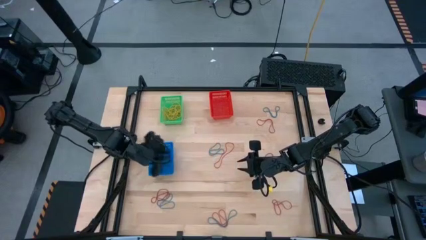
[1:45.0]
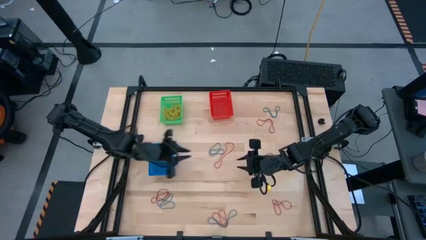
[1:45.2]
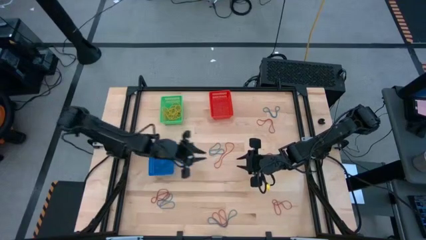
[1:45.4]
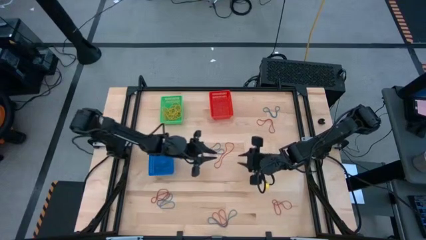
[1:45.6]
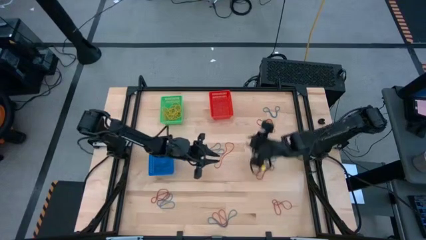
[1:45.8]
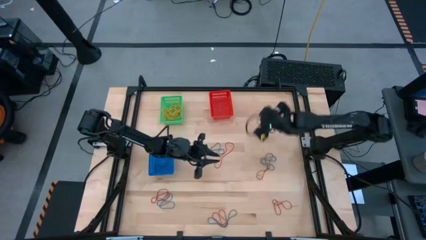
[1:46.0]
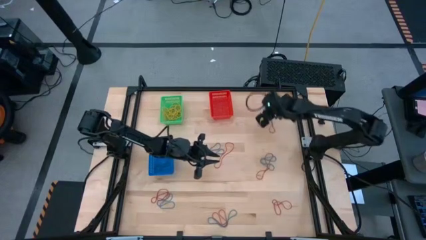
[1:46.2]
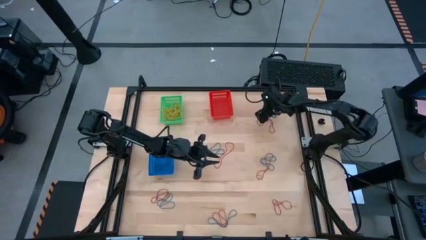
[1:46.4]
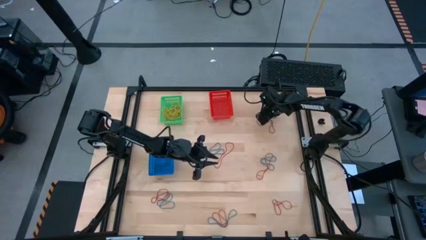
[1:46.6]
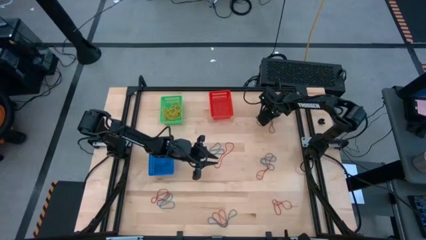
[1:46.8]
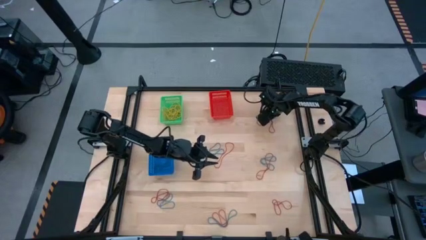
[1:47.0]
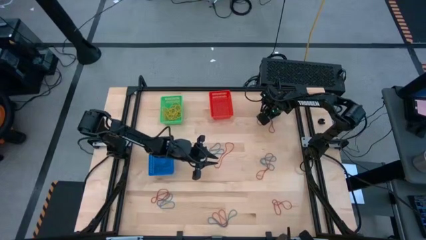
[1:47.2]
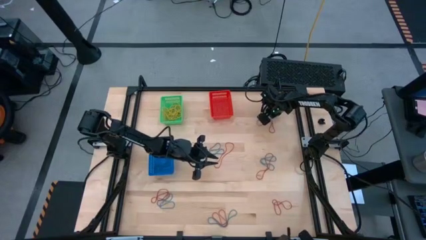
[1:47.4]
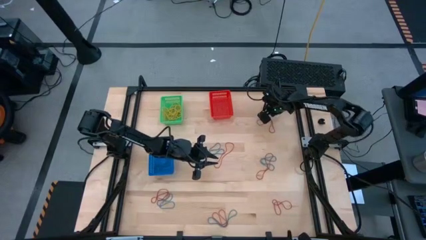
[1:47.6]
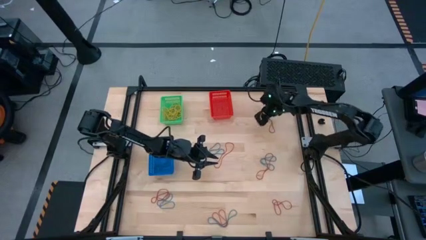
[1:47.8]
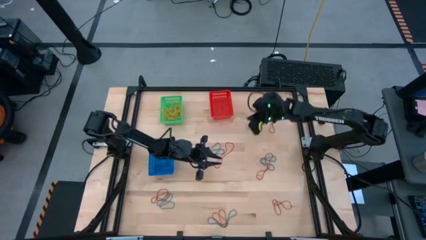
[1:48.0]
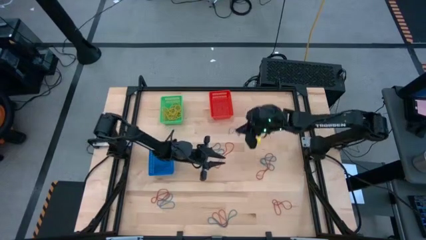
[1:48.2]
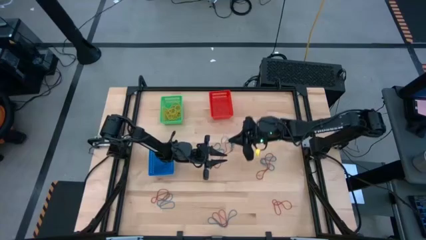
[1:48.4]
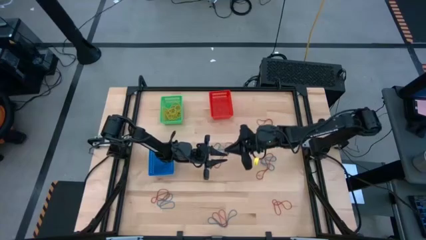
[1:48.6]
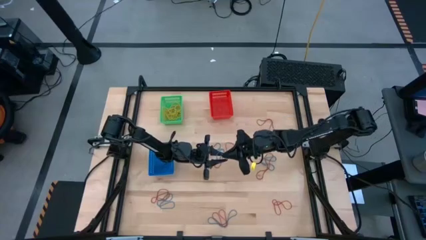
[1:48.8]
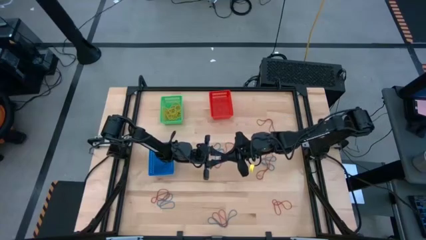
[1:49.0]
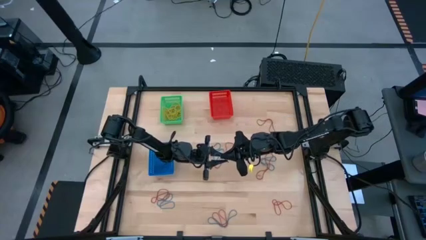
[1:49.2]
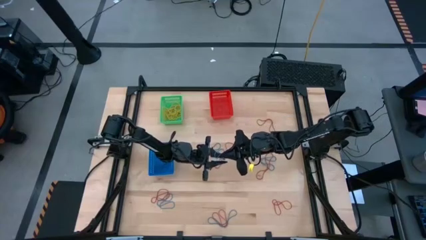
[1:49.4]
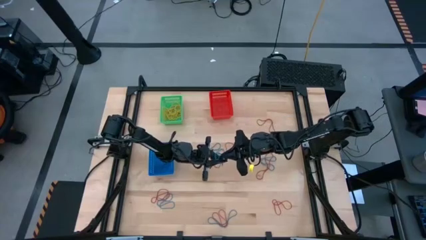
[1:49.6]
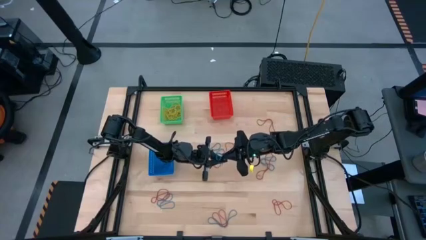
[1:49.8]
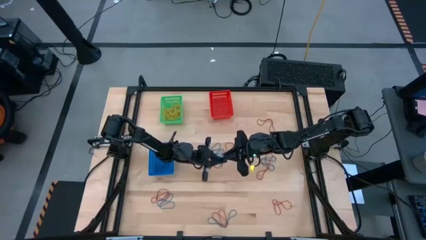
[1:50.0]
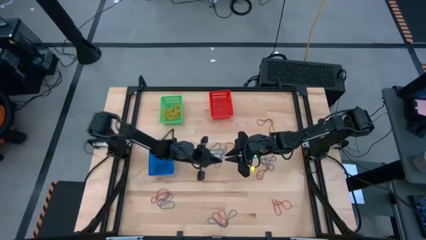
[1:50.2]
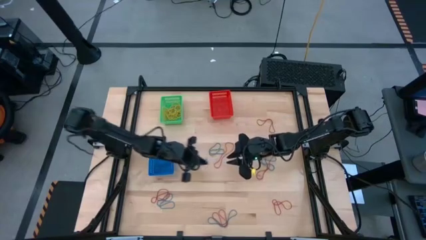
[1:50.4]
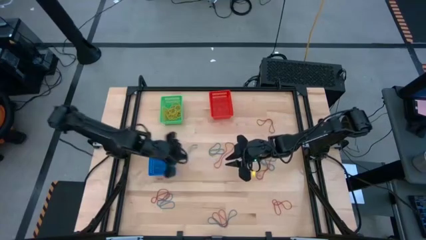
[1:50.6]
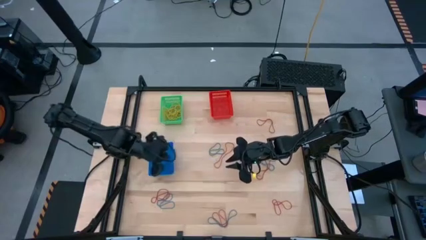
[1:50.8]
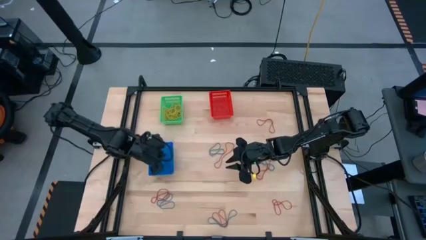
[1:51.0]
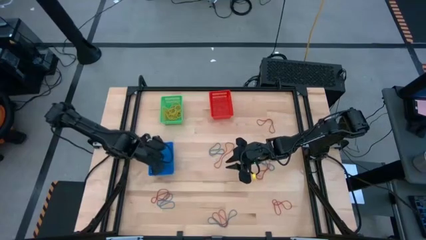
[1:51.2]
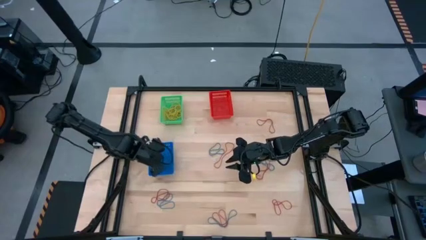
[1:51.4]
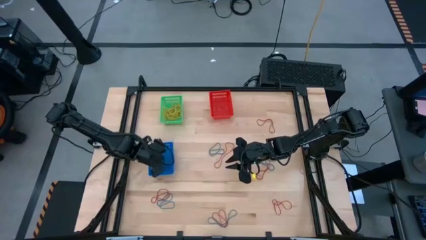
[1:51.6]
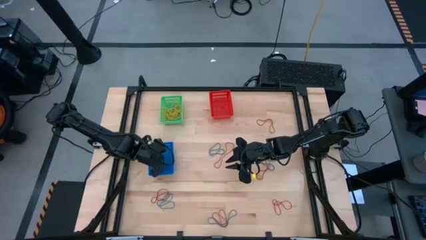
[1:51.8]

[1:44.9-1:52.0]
Task: Sort rubber bands into baskets
Put the blue rubber band into the blue bin

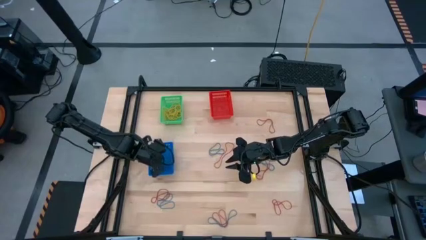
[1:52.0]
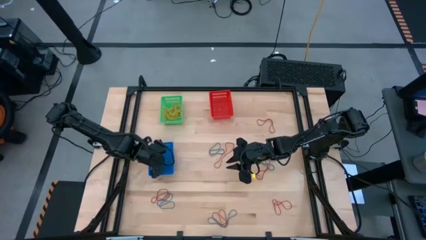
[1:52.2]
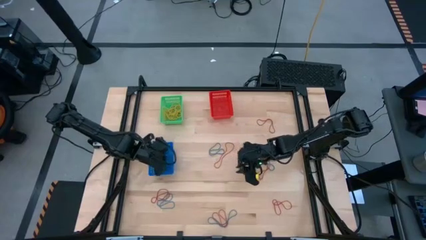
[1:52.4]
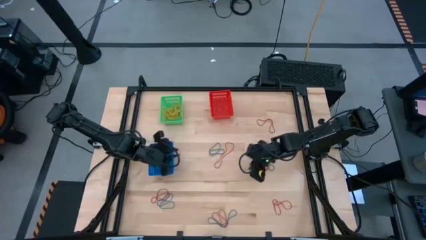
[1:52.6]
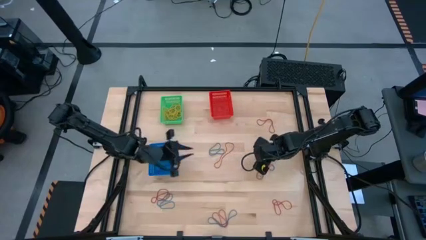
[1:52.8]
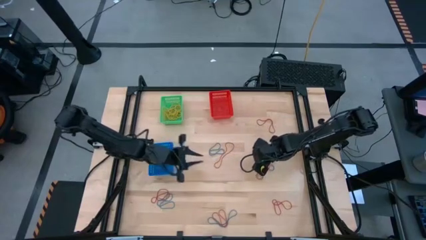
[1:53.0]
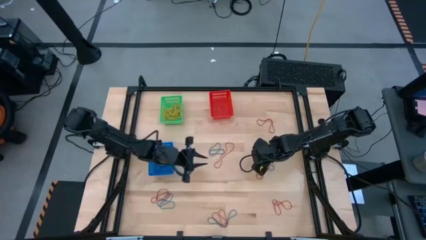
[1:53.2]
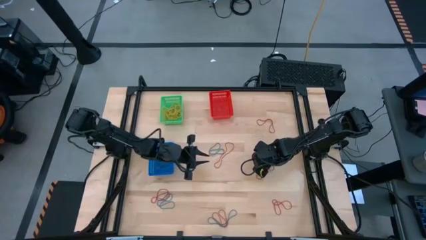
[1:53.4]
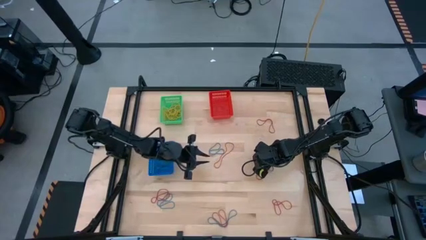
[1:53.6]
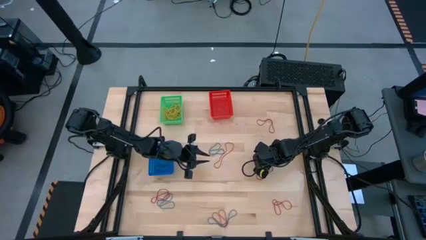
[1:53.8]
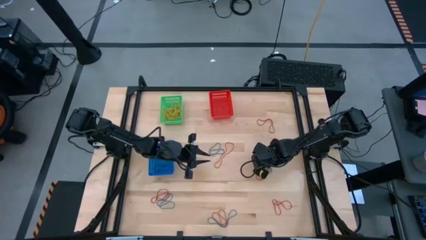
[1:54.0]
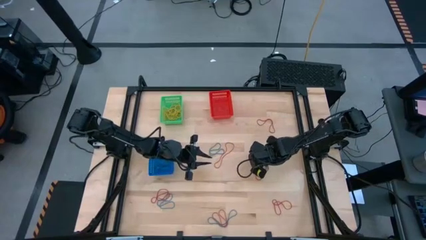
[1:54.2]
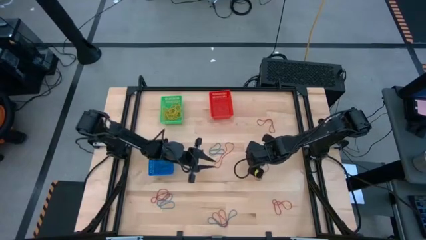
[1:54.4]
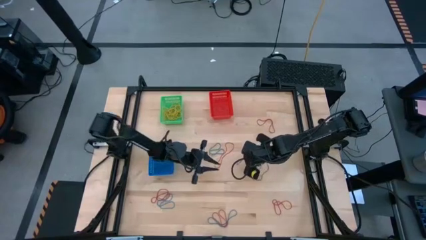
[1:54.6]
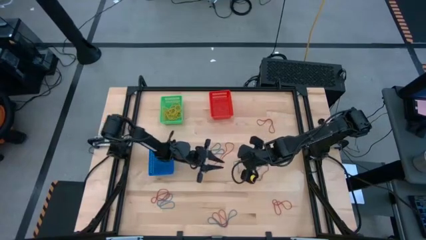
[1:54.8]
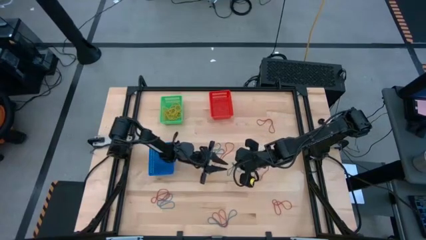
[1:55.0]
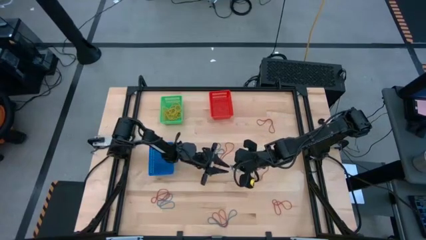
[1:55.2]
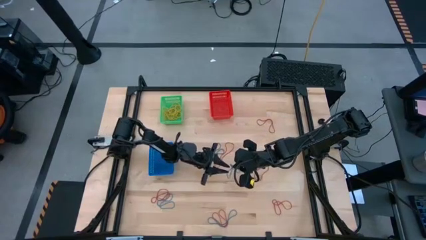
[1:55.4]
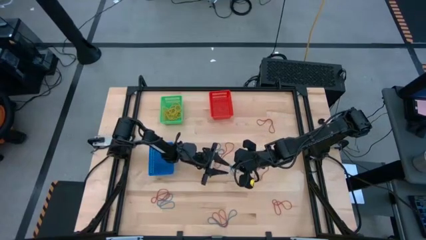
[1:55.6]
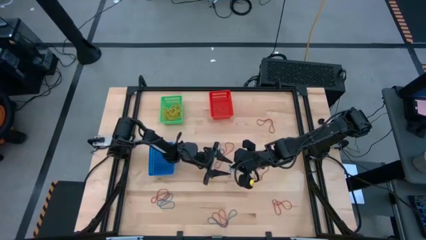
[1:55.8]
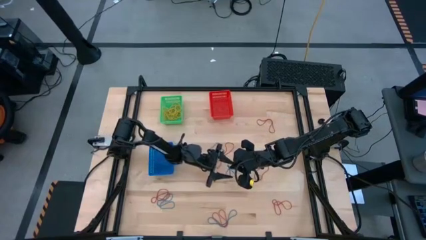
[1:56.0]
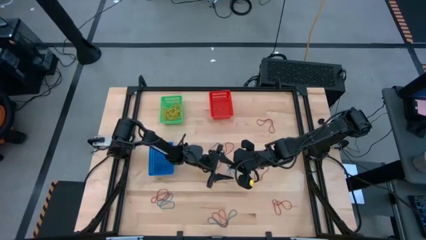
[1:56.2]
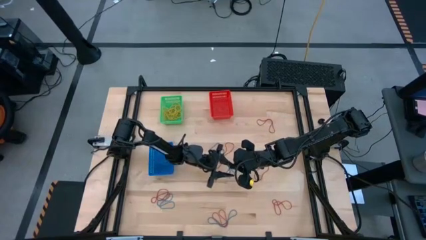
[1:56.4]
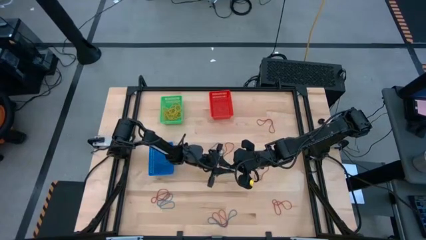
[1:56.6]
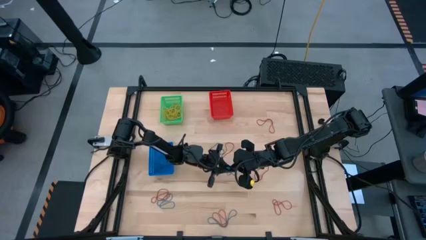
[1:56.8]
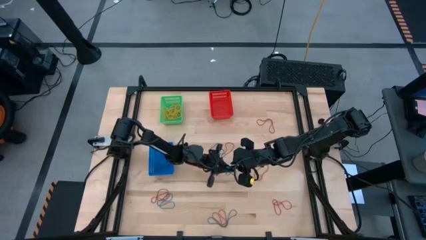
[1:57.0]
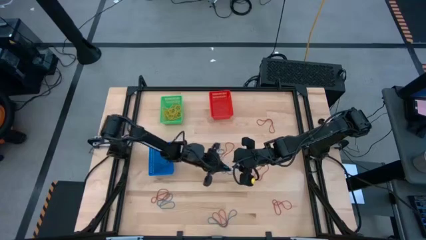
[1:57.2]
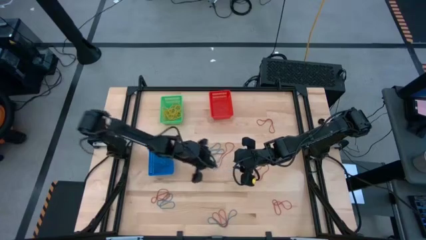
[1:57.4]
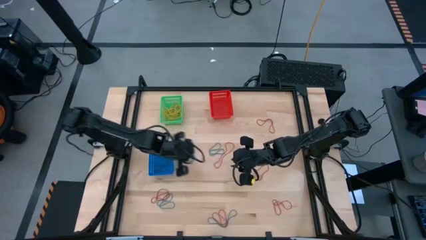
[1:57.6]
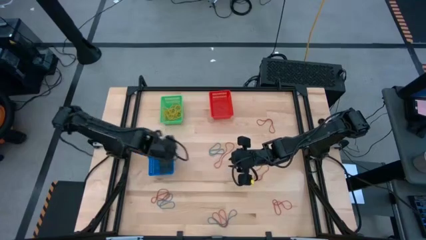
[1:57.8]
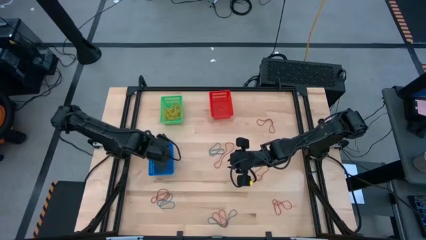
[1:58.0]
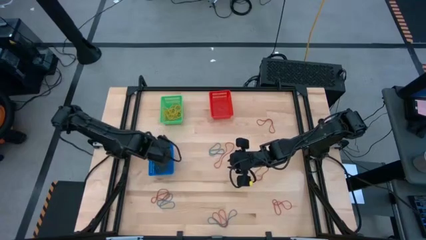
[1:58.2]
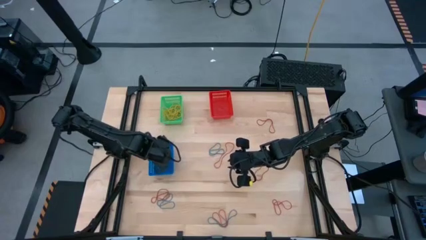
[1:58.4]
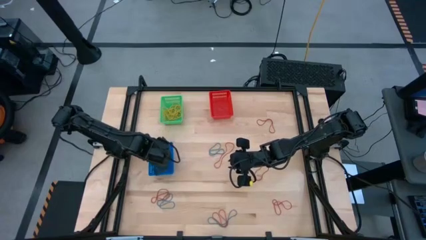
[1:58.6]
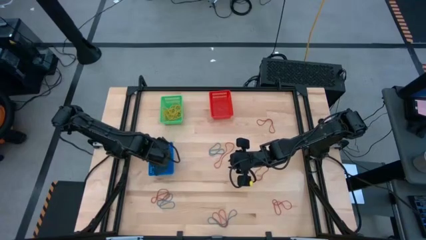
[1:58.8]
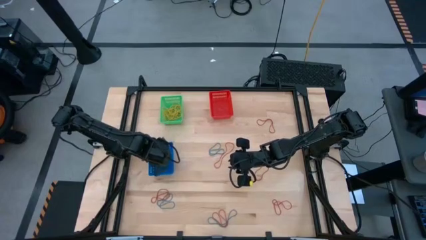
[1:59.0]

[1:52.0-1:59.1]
Put the blue rubber band into the blue bin

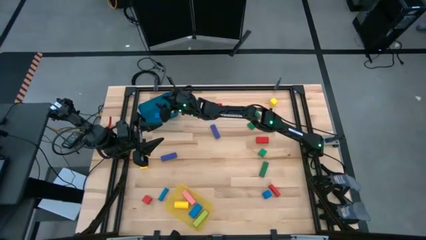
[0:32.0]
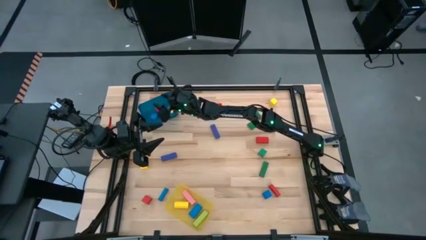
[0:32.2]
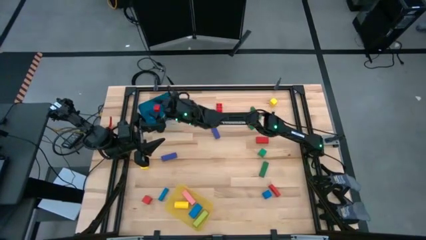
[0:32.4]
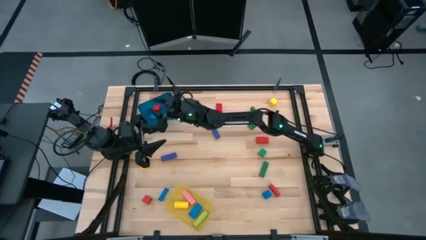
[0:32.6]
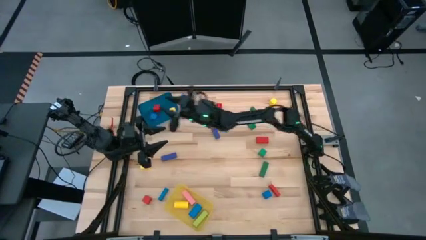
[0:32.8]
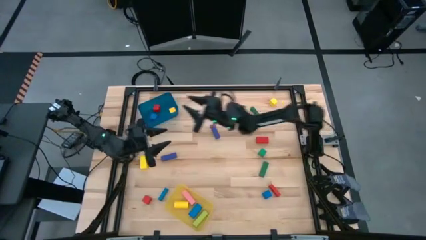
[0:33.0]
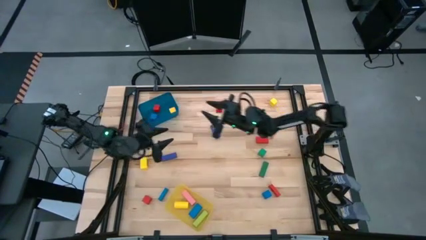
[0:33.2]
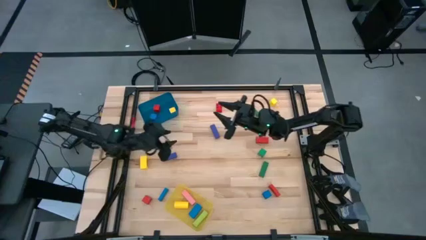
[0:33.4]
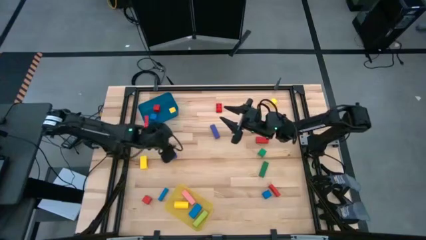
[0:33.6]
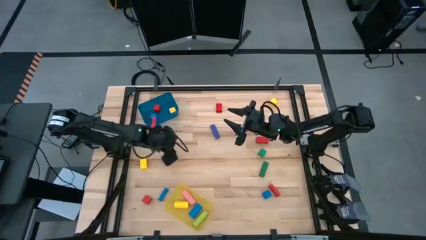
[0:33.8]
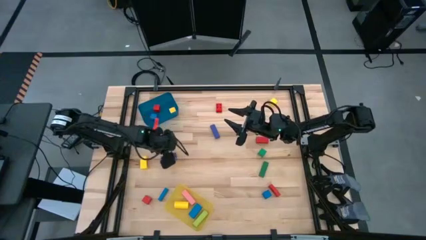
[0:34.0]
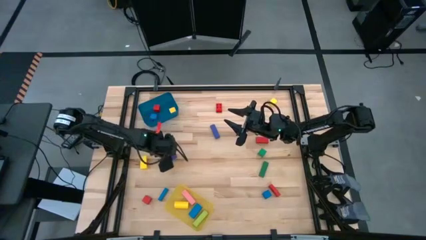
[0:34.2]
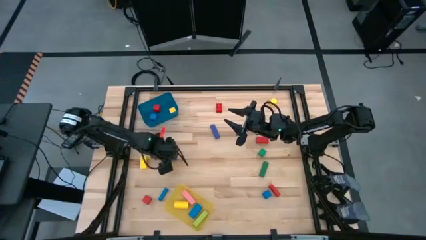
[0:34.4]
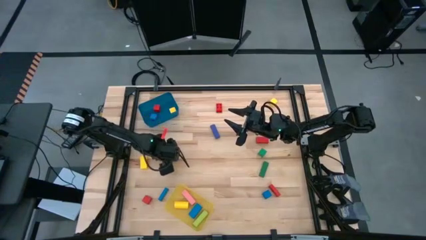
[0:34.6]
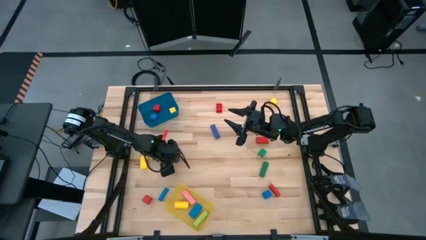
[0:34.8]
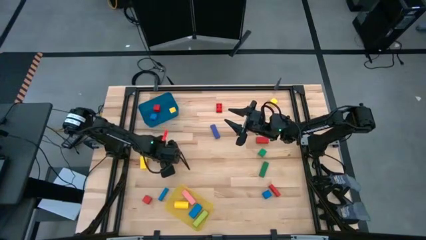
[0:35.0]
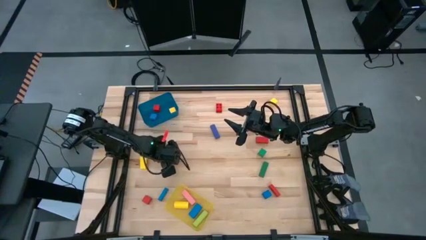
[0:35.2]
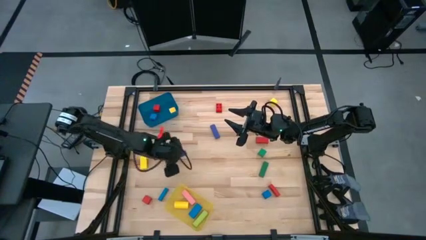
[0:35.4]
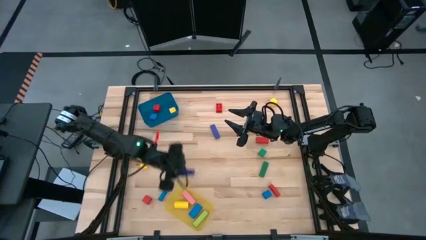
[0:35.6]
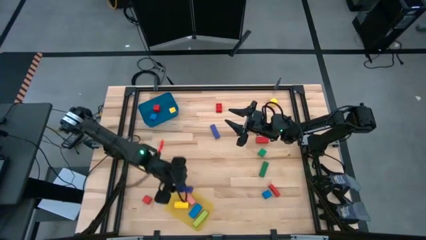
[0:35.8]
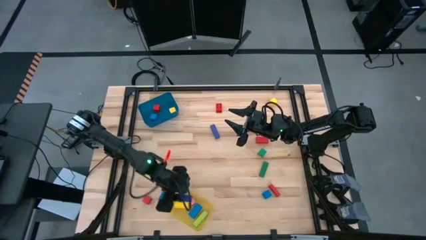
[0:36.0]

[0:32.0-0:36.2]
Task: Sort blocks by size
Put the bottom large violet block into the yellow bin
